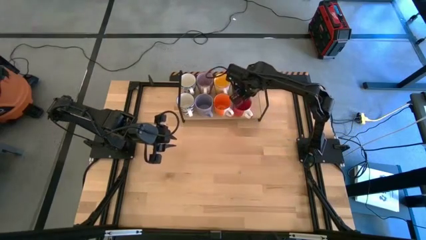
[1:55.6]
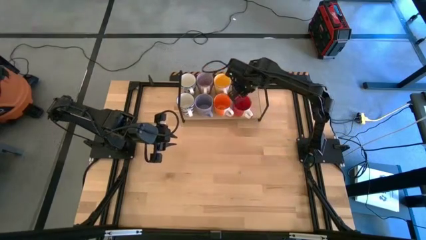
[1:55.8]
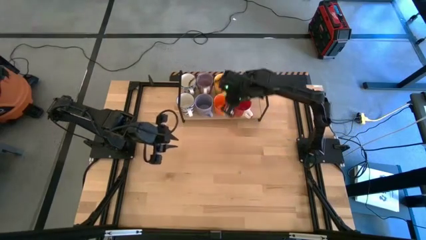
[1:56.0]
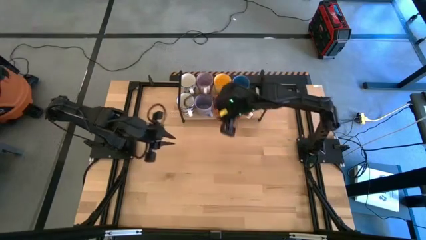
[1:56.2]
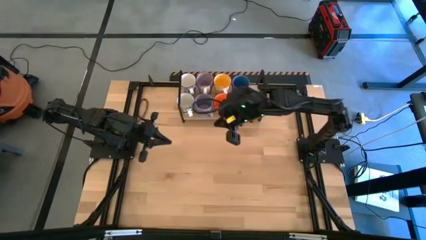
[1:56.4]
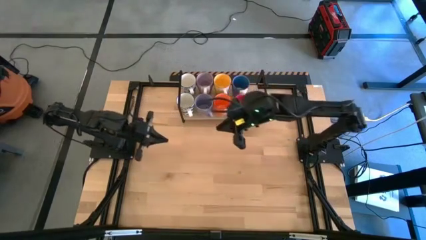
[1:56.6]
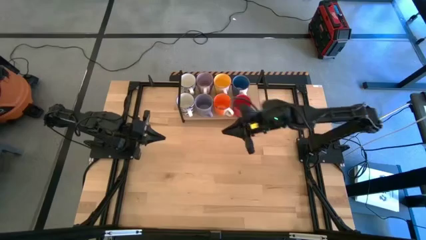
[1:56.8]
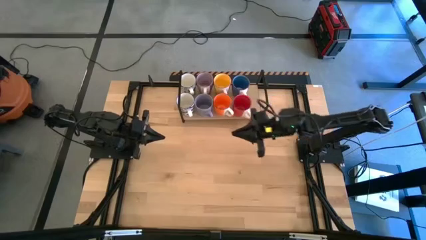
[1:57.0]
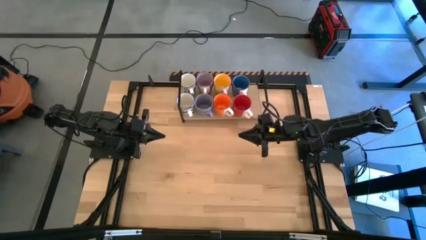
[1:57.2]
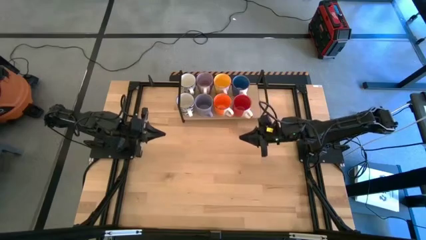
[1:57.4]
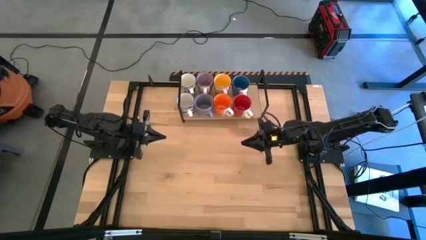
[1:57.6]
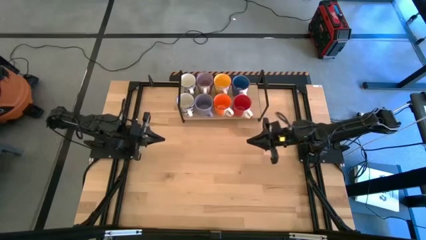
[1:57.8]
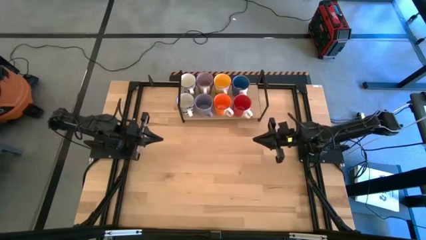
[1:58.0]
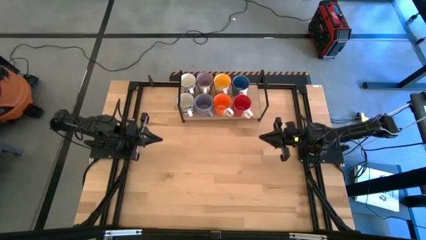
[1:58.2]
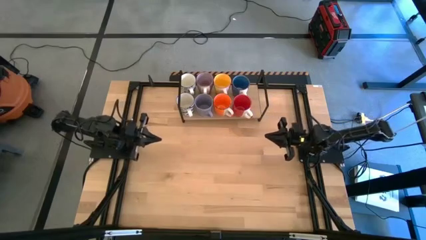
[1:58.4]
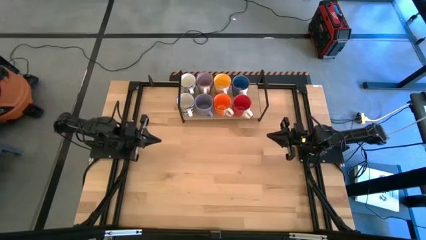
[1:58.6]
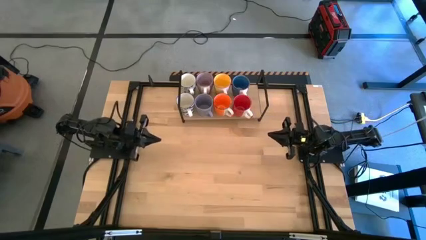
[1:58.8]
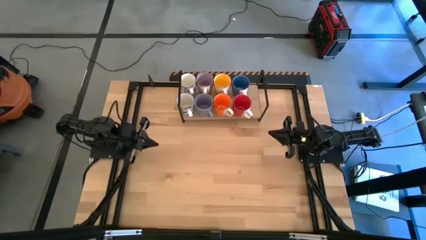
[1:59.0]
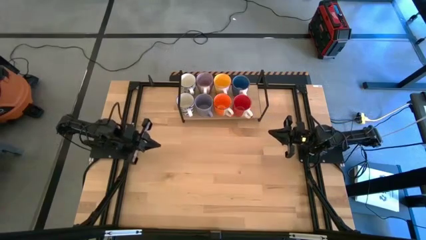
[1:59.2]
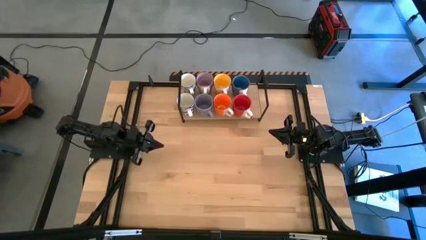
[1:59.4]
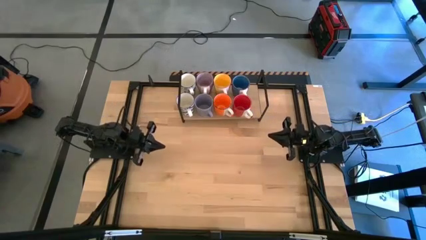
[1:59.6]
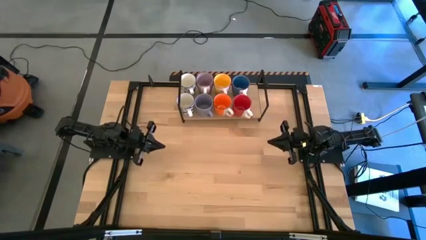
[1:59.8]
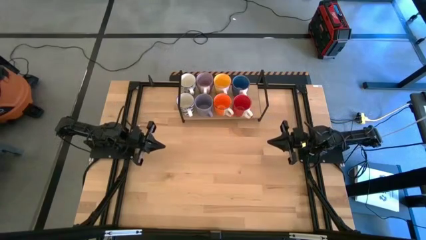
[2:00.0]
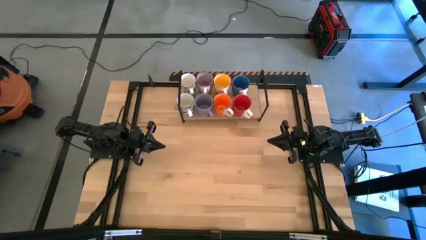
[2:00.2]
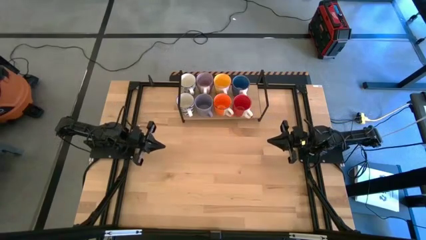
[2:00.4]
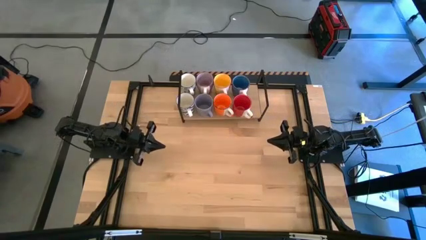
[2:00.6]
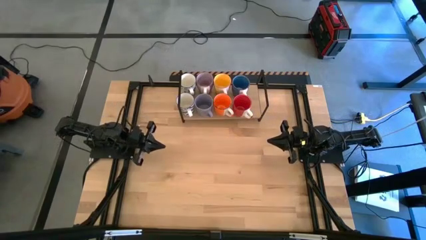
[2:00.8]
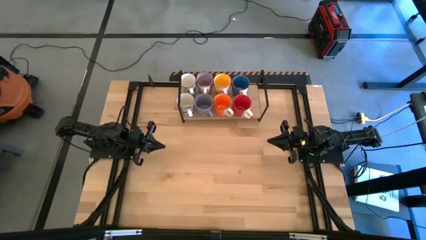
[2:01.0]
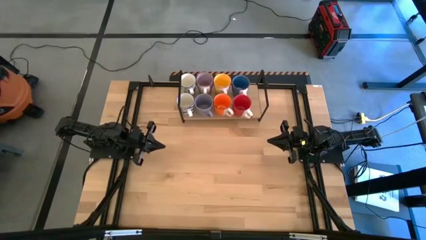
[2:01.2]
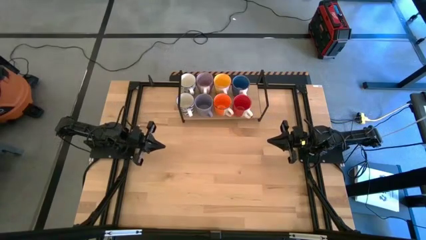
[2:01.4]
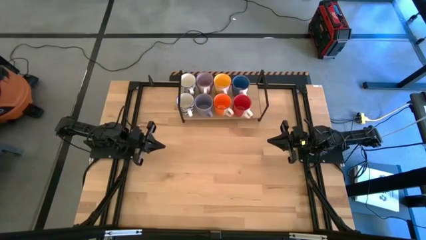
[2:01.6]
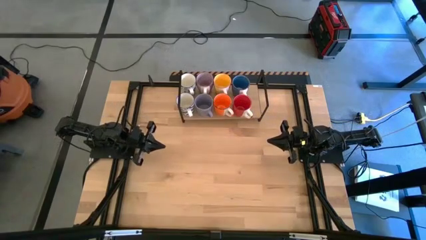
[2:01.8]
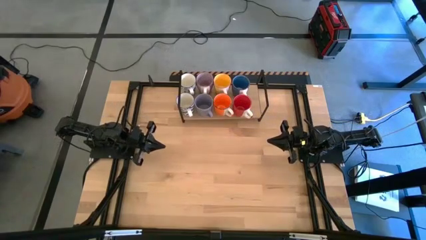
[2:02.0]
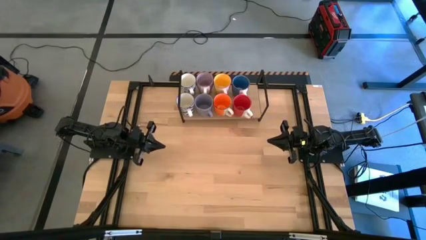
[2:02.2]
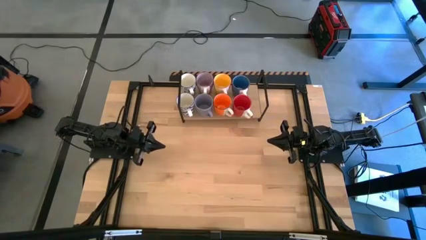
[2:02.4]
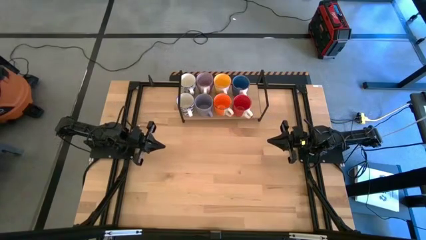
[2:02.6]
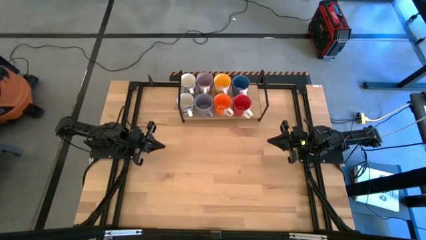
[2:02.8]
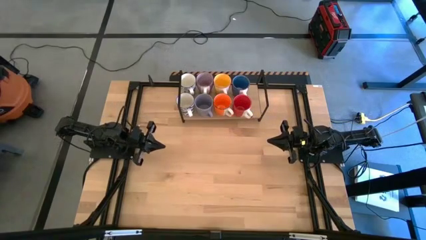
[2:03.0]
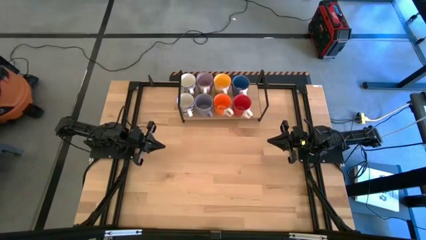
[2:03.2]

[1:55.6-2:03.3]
Task: Place coffee mugs
Return to Home Position

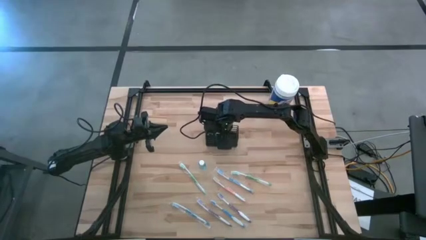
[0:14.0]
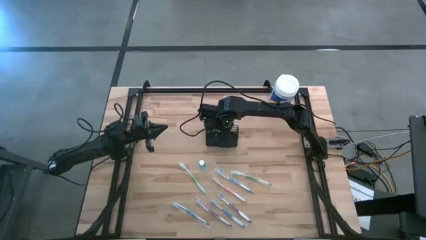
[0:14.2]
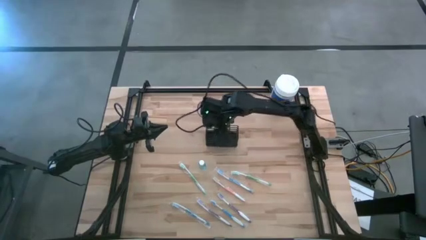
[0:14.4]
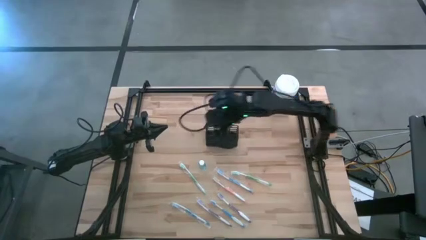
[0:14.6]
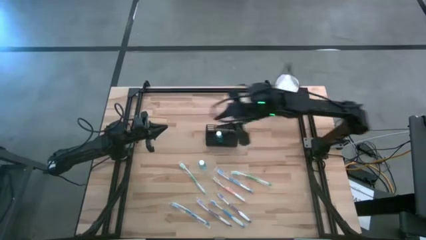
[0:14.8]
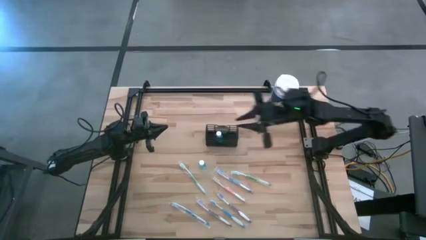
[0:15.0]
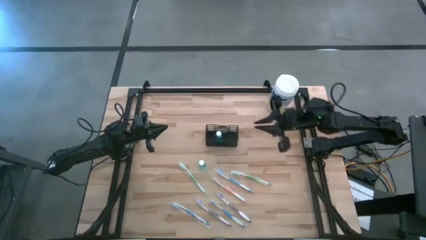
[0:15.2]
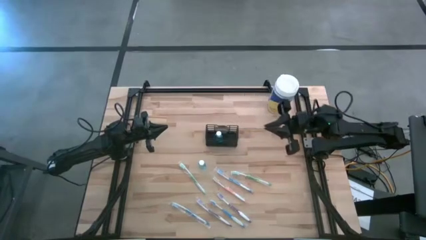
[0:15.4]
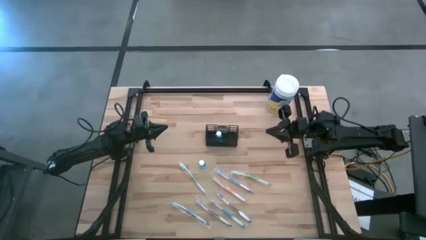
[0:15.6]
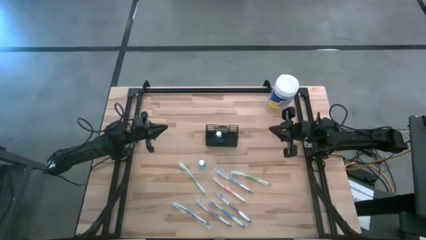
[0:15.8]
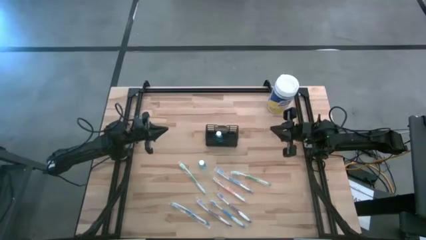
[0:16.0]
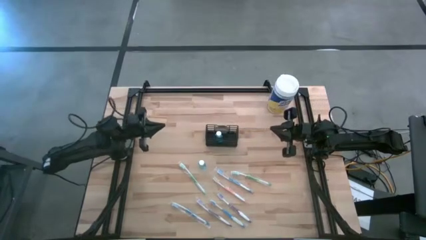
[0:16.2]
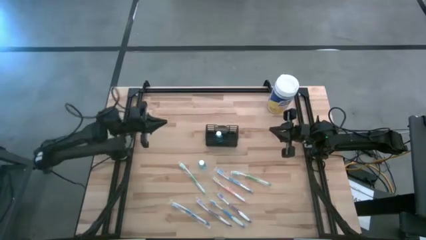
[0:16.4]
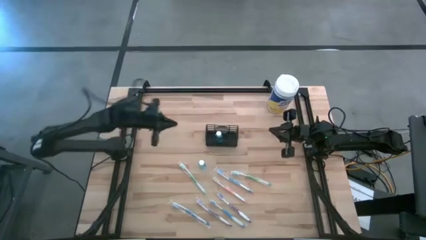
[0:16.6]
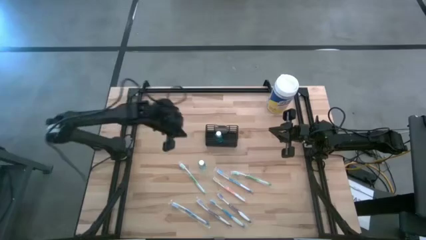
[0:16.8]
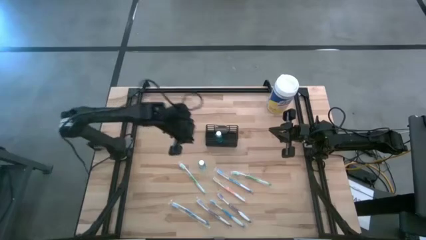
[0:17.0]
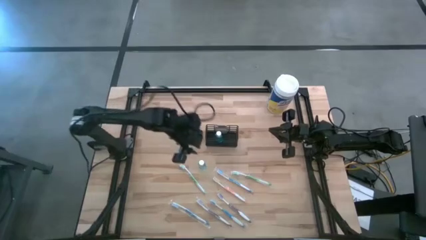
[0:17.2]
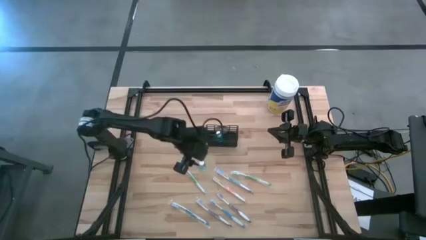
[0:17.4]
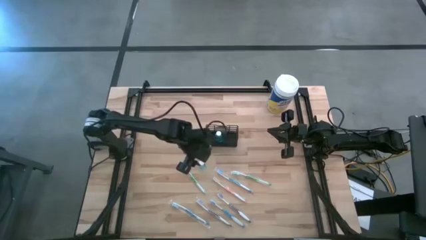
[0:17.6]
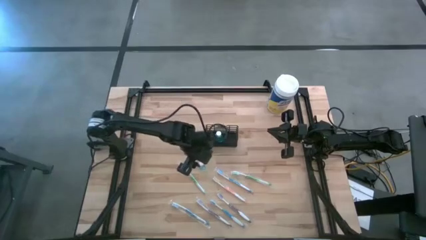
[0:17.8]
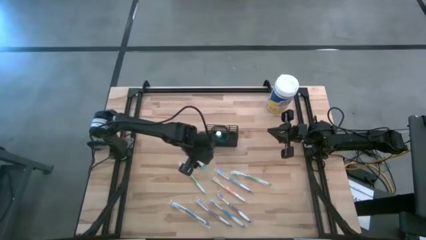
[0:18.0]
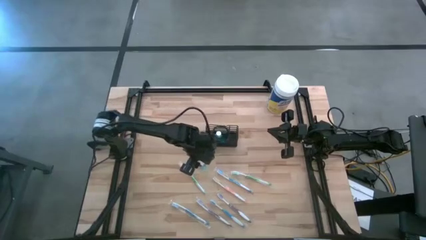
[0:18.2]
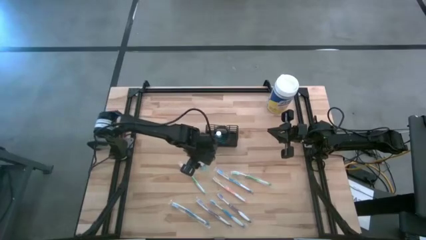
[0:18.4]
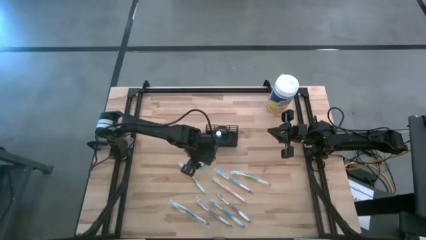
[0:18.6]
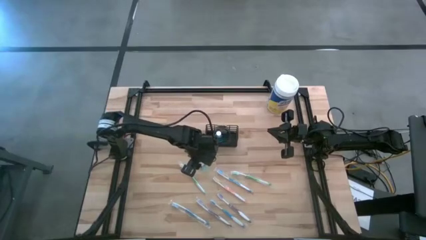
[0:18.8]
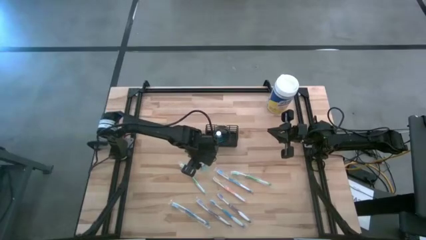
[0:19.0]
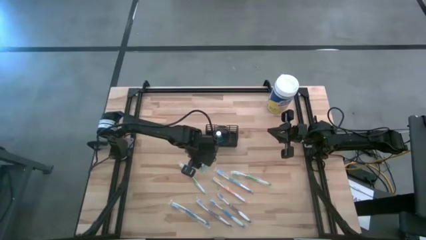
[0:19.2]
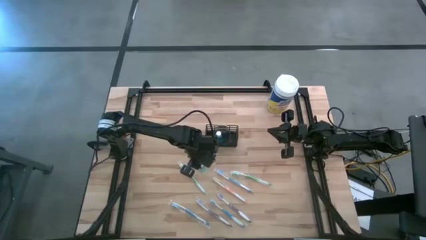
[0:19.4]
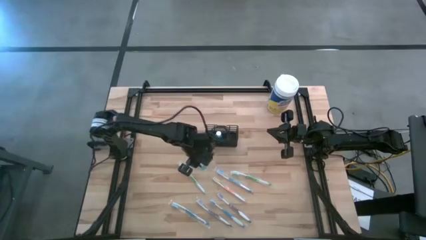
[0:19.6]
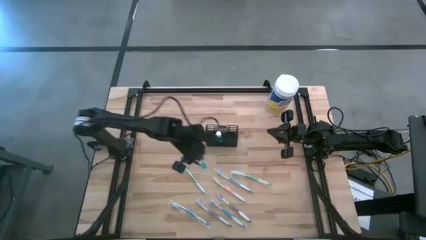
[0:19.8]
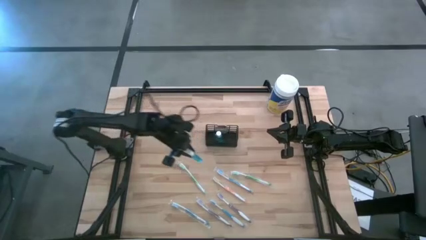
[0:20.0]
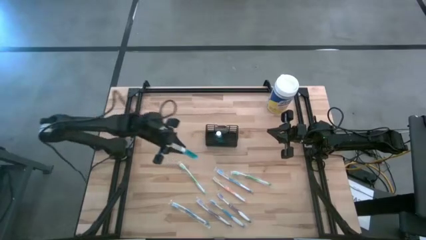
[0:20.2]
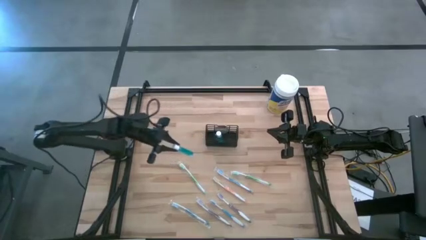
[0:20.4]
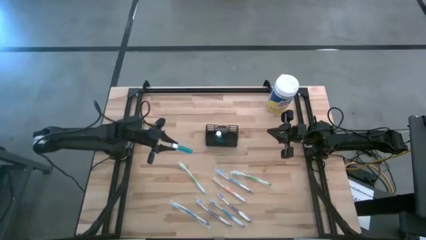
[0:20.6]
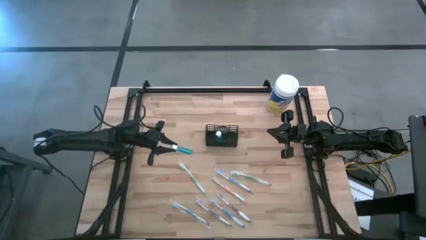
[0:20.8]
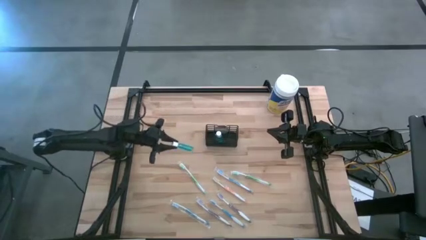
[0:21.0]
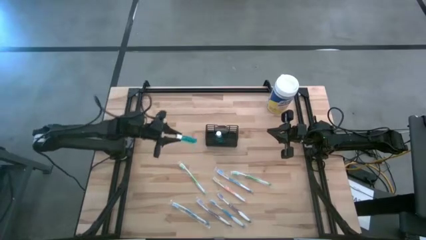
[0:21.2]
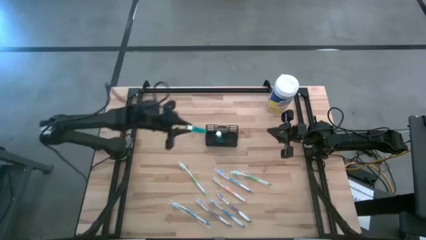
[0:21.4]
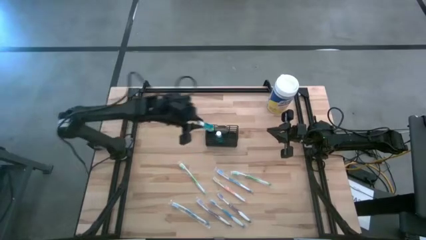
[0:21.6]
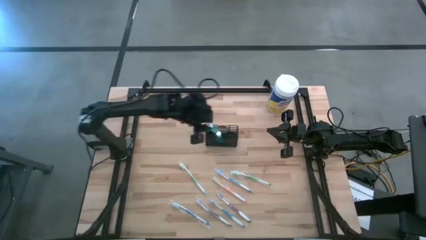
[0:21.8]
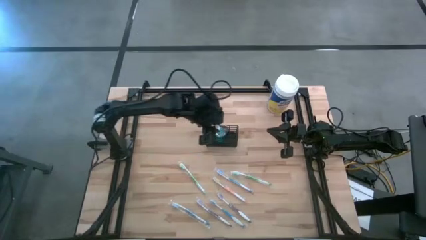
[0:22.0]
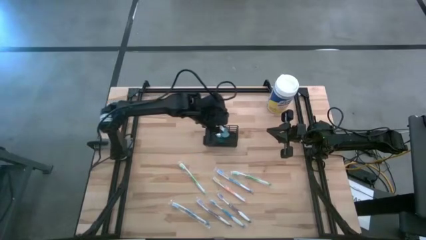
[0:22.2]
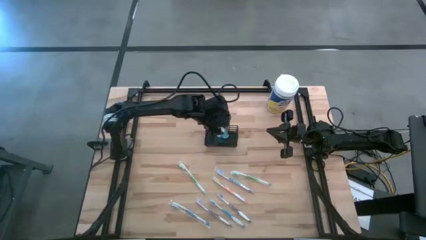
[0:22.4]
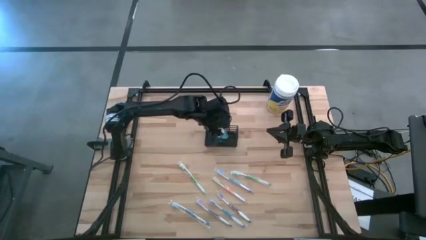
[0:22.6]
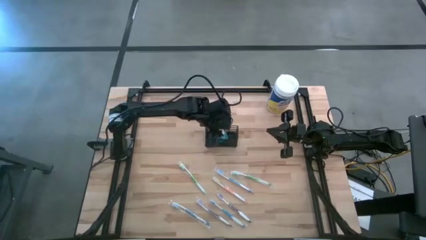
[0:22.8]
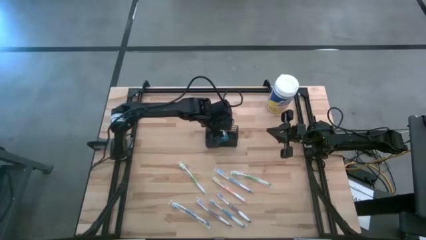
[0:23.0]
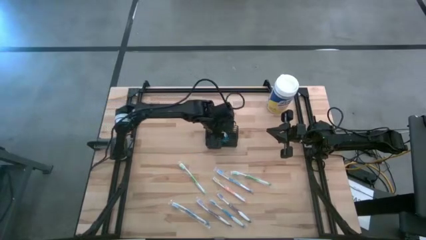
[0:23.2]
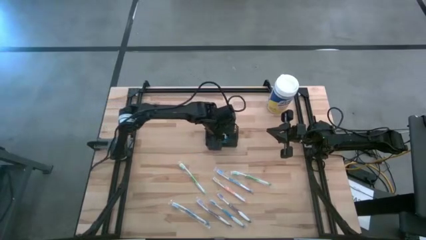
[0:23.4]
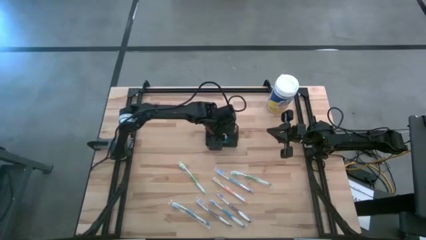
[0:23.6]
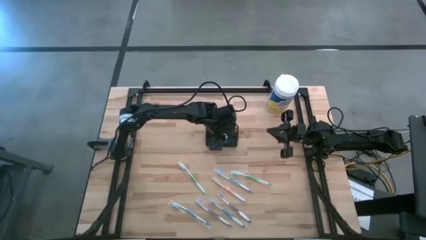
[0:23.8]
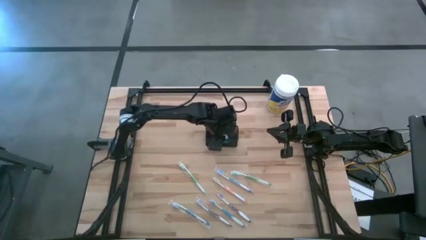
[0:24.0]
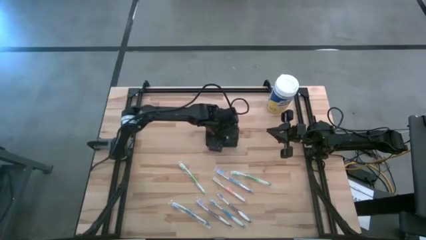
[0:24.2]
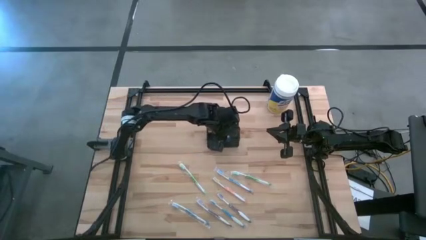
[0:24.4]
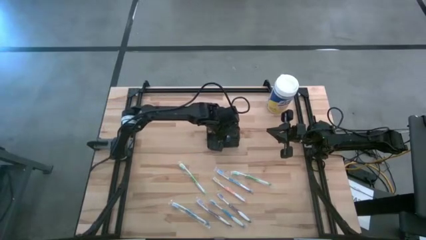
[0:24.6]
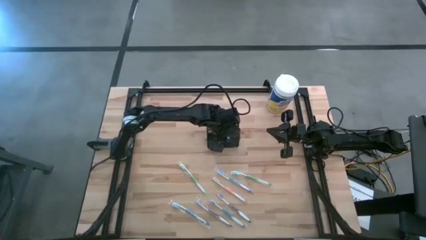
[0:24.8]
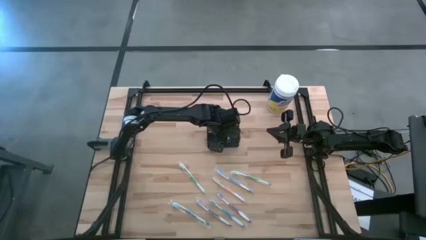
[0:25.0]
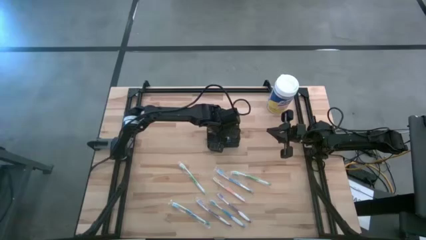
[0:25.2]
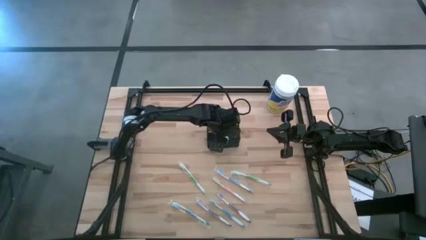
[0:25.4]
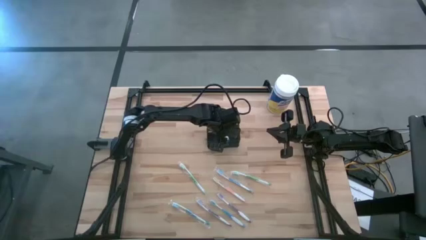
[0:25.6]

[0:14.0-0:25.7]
Task: Pick & Place toothbrushing station
Put the mouthwash into the wire organizer
